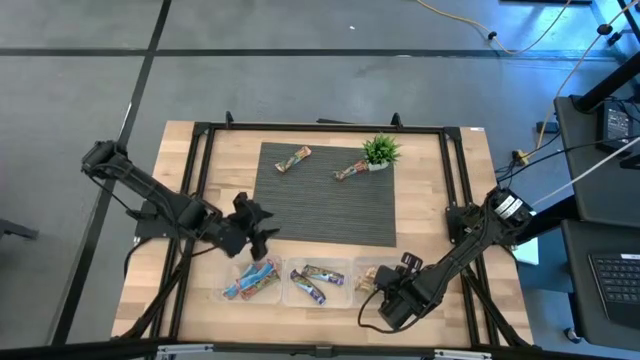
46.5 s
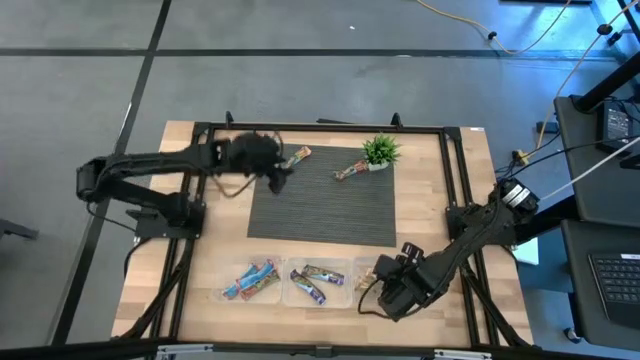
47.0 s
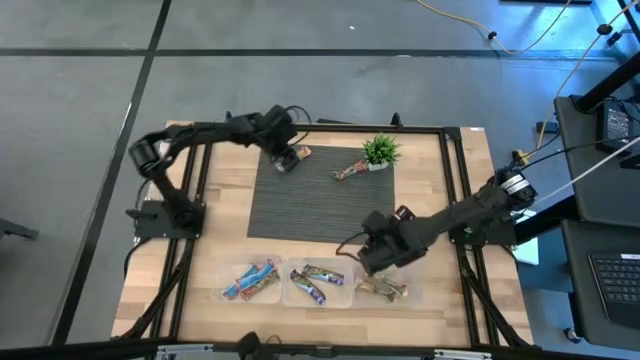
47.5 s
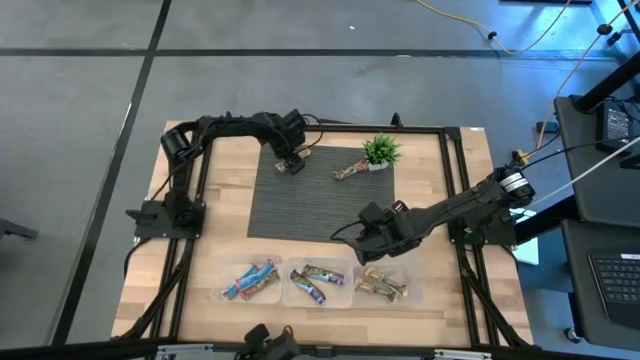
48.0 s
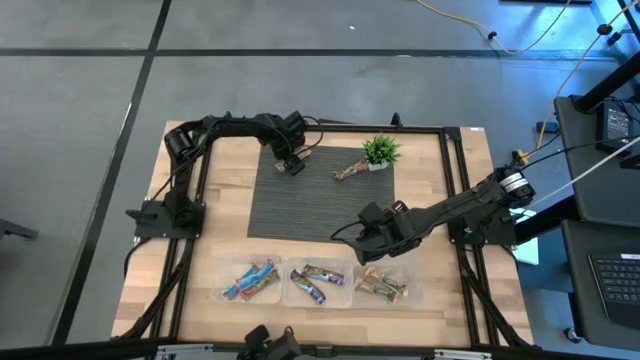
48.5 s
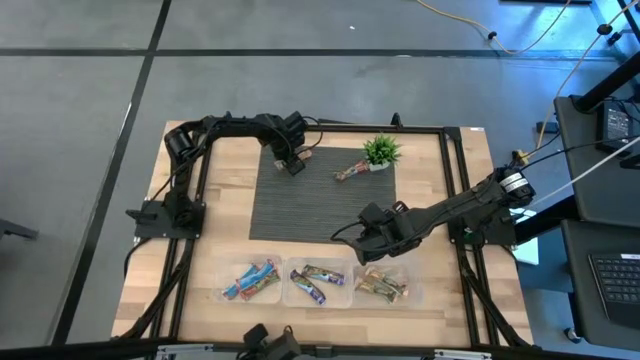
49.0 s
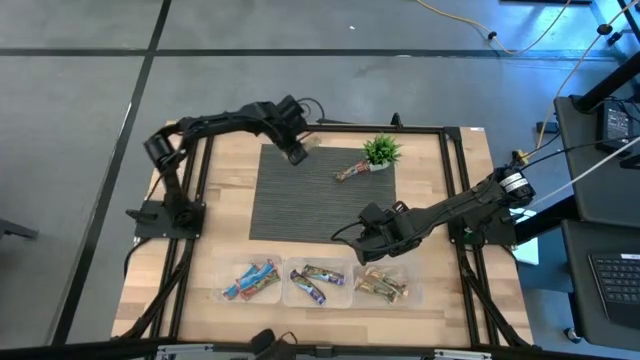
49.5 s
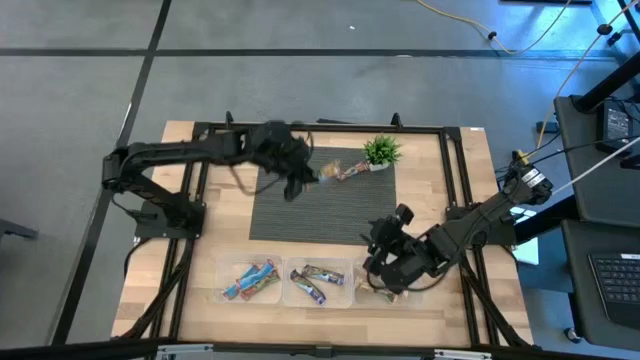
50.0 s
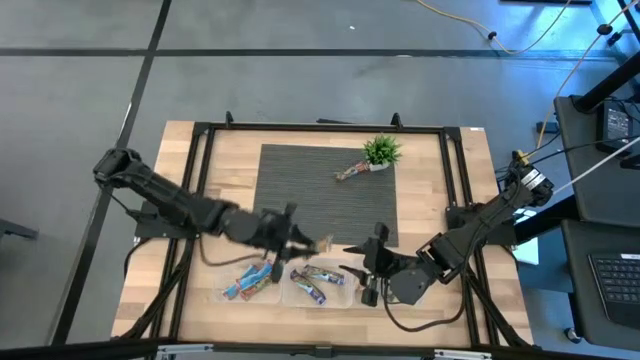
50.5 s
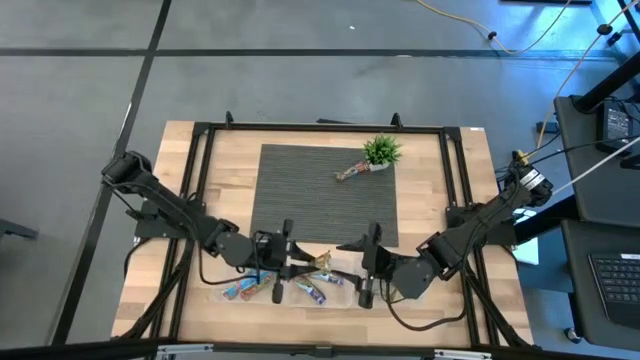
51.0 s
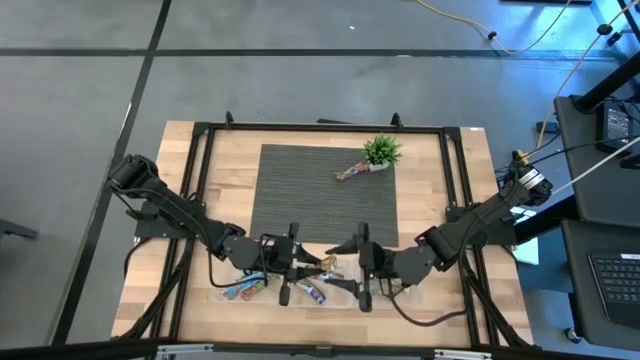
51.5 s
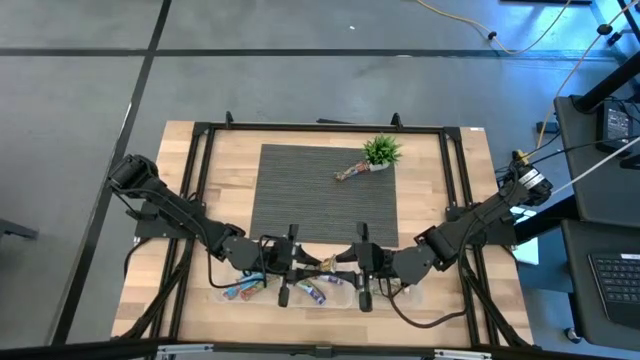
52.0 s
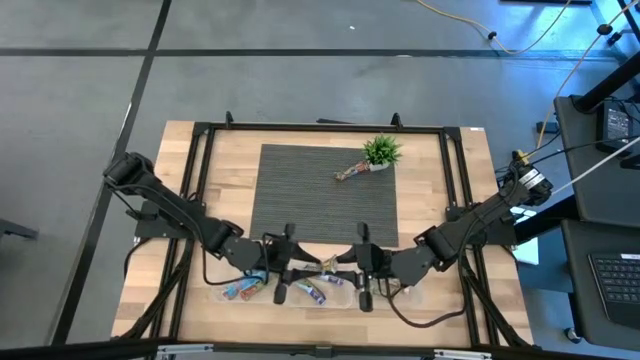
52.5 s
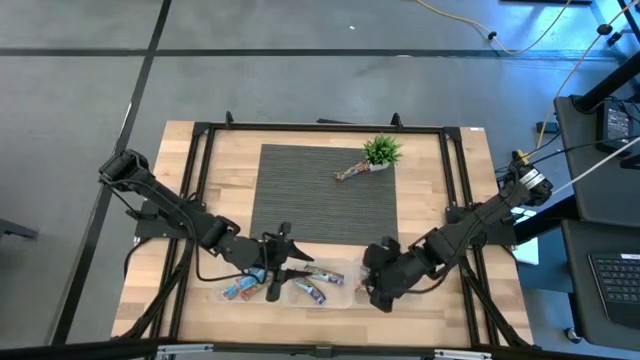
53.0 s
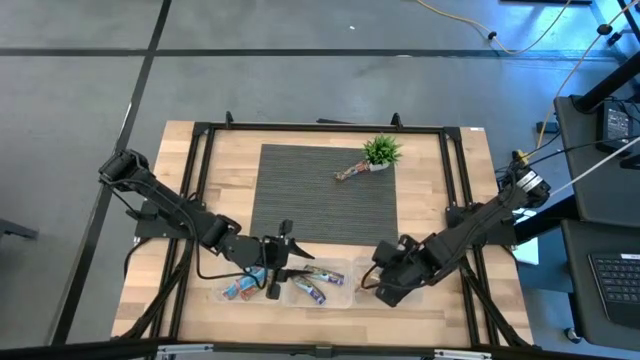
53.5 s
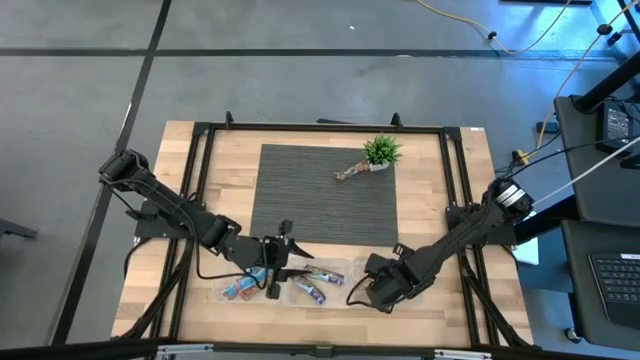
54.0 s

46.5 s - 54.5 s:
Task: Pick and place Granola Bars by type
Put the yellow granola bar into the right transparent bin

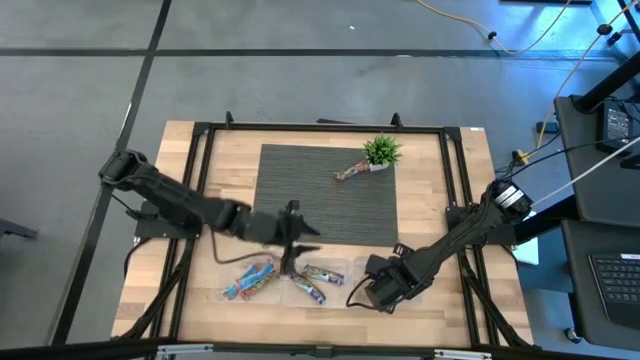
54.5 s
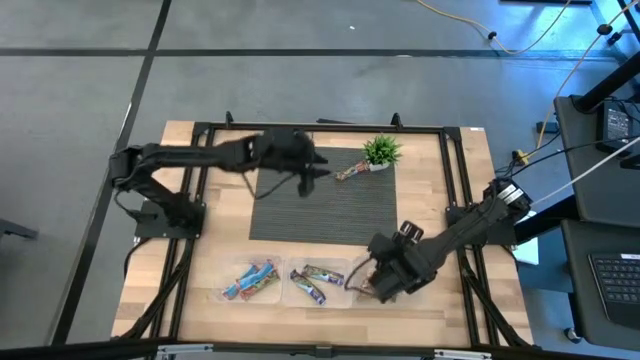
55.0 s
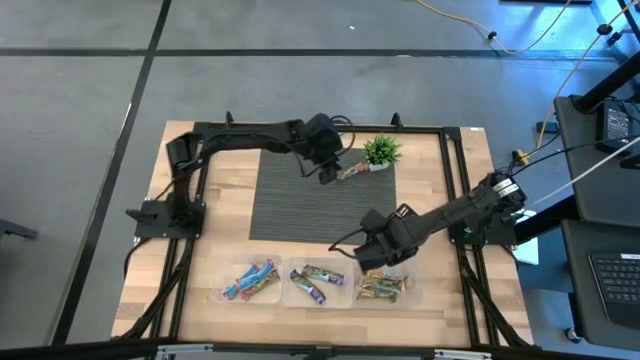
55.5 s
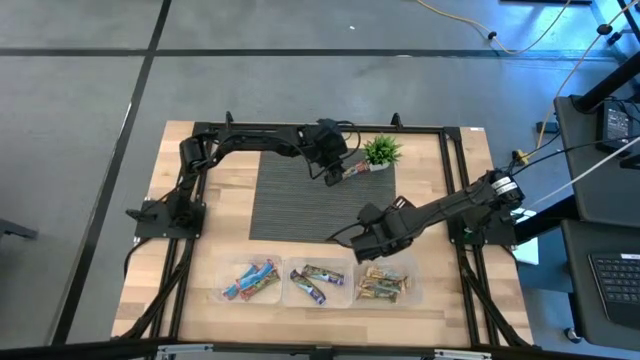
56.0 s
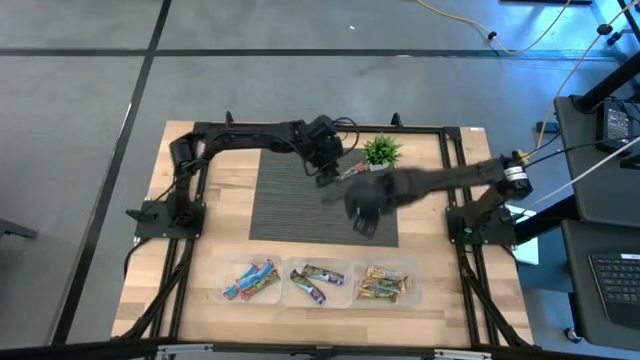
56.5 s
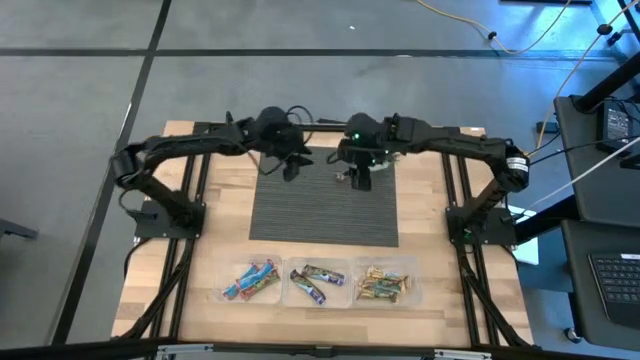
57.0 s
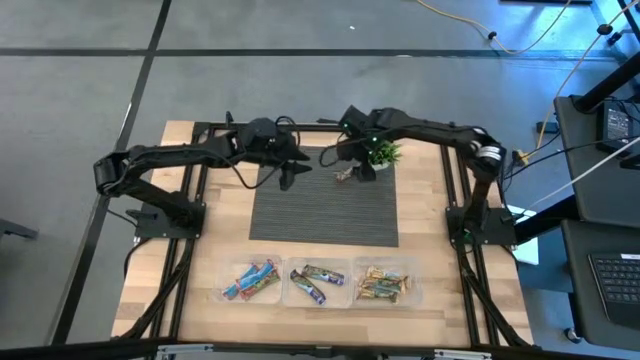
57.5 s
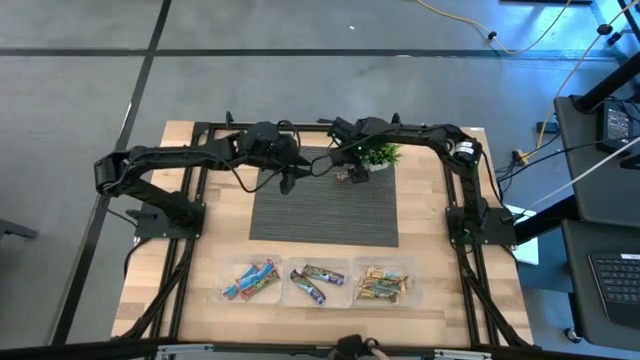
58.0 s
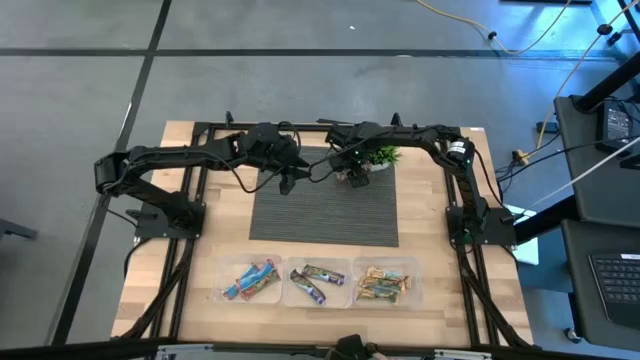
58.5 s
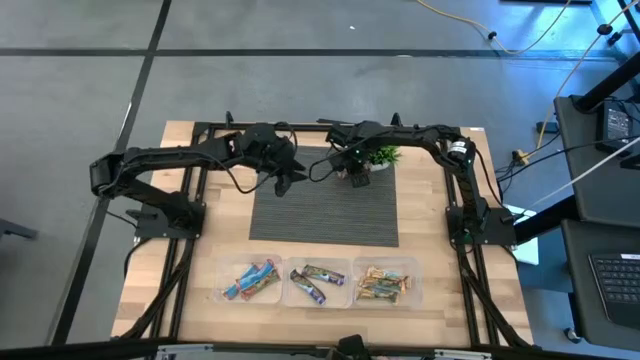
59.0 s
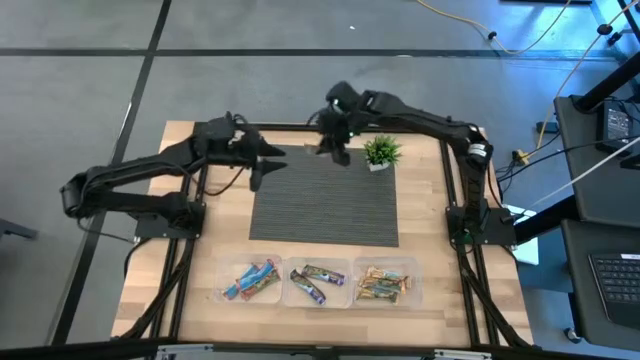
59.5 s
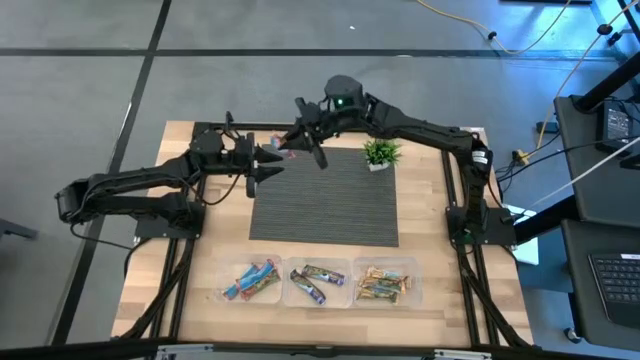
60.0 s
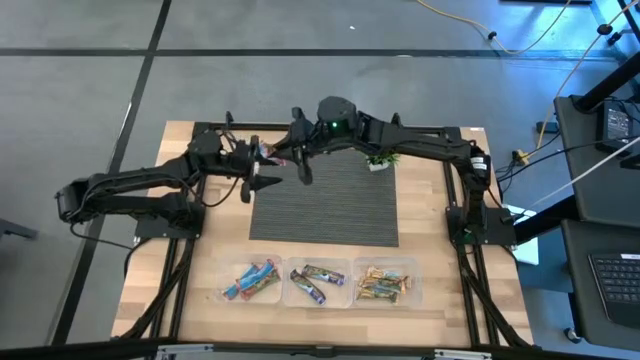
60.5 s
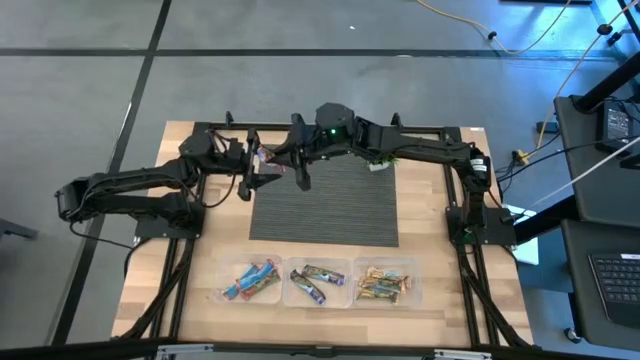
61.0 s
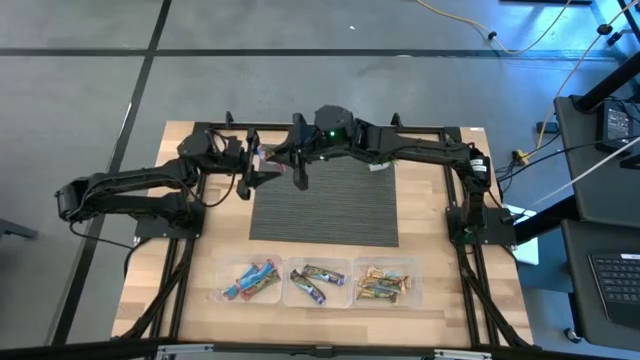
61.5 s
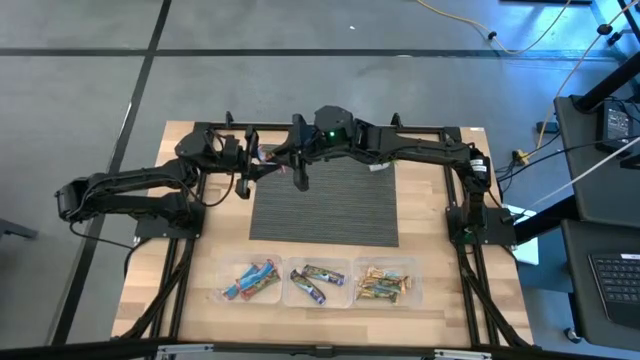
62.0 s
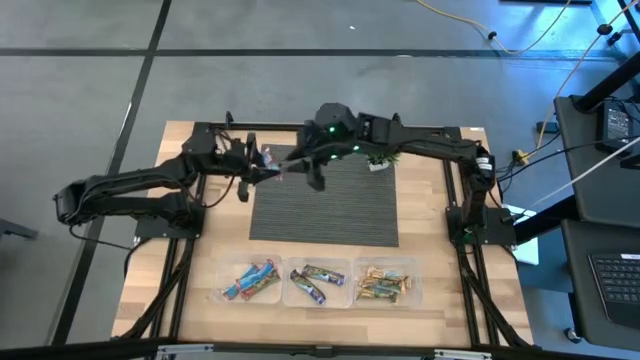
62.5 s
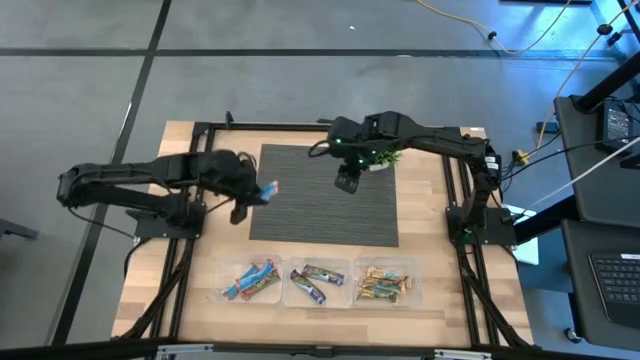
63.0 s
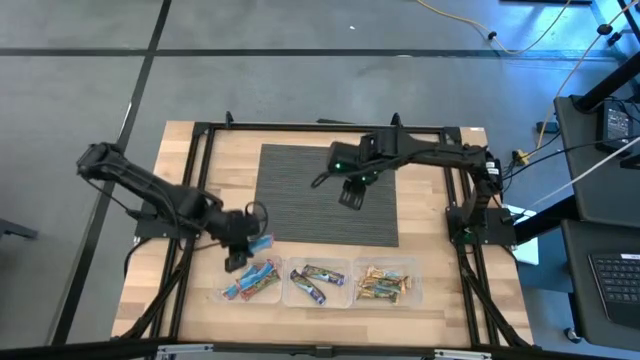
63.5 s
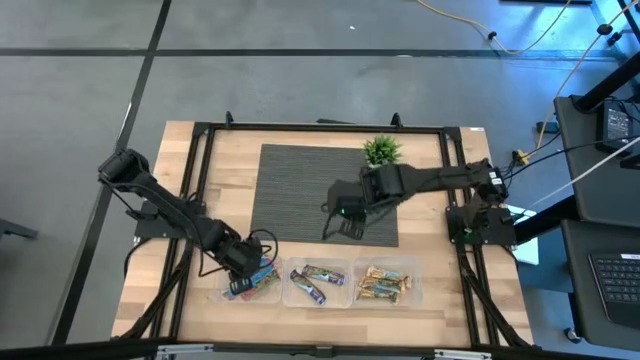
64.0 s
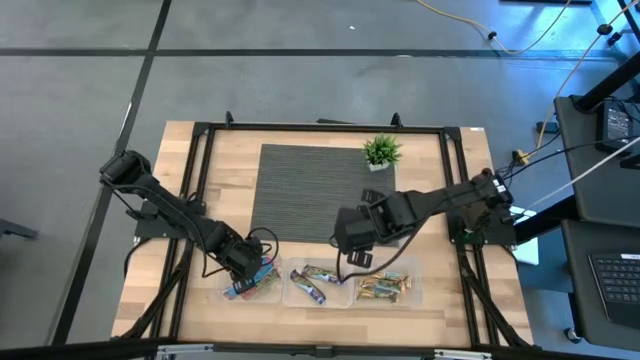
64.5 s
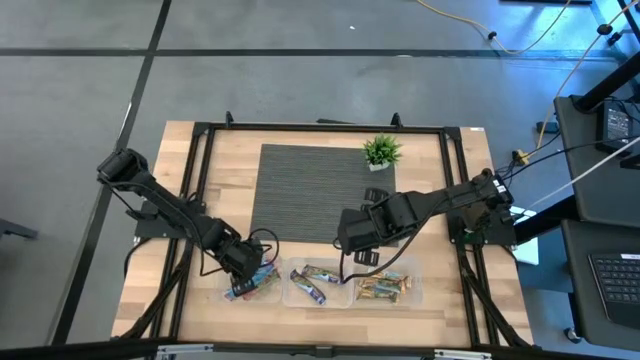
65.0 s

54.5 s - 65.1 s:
Put the red granola bar into the left transparent bin

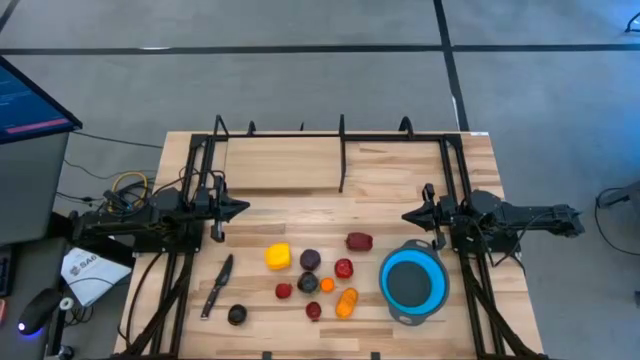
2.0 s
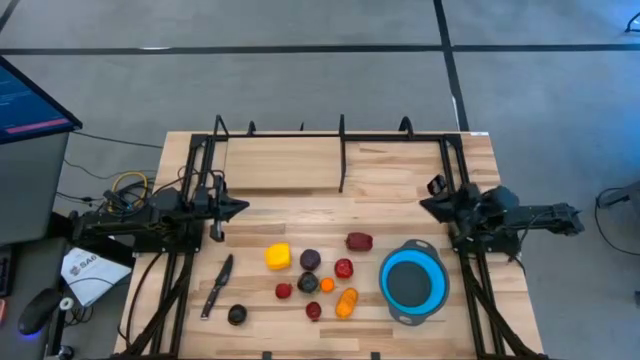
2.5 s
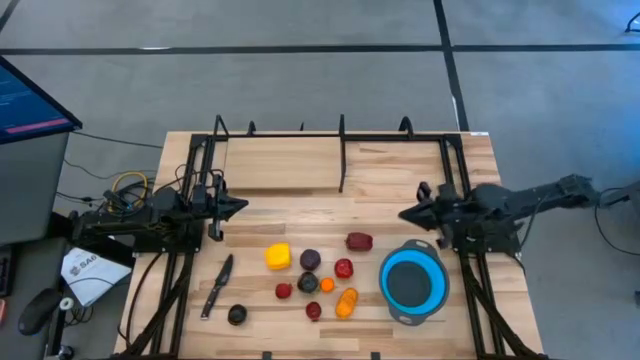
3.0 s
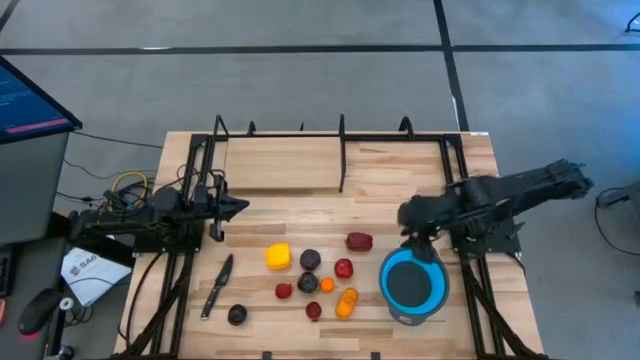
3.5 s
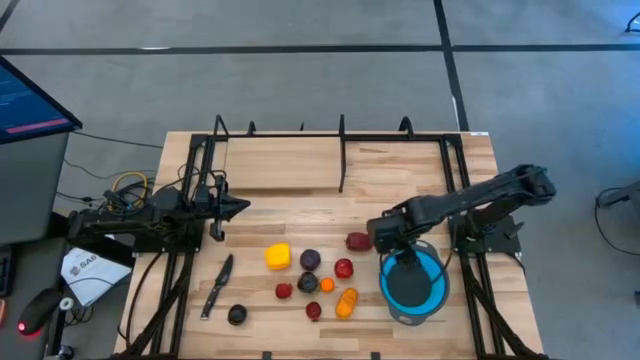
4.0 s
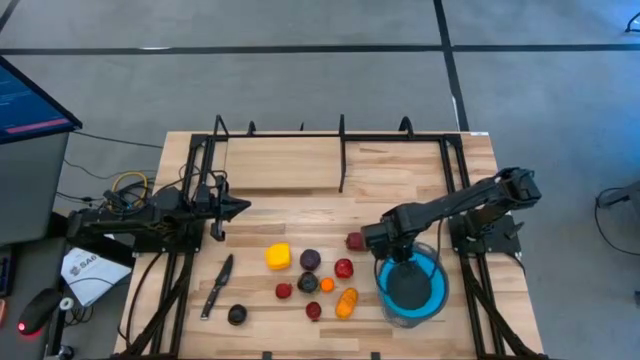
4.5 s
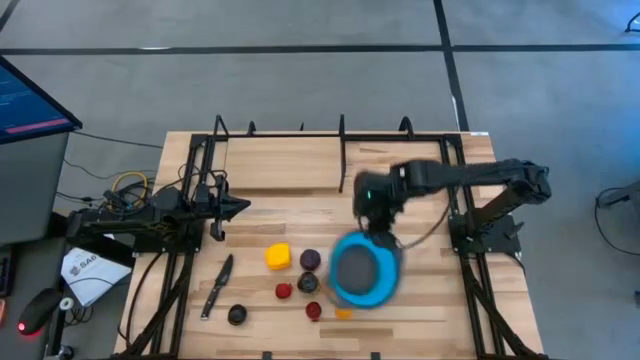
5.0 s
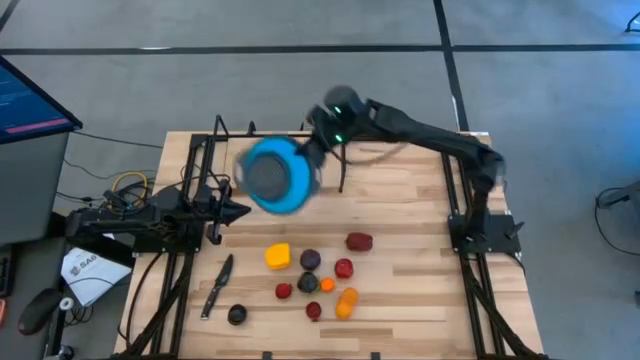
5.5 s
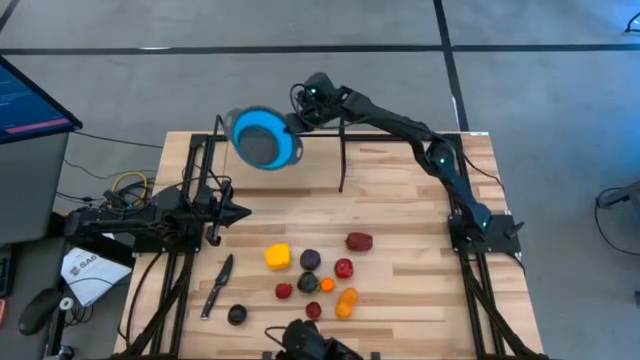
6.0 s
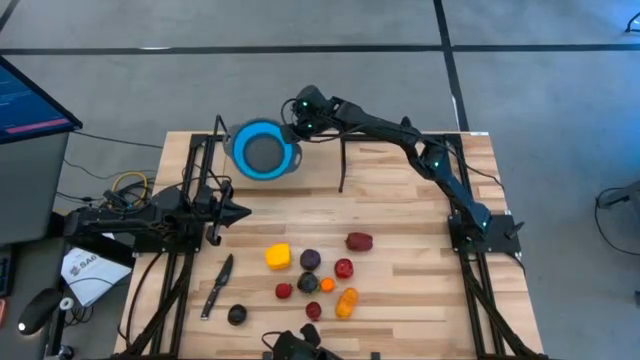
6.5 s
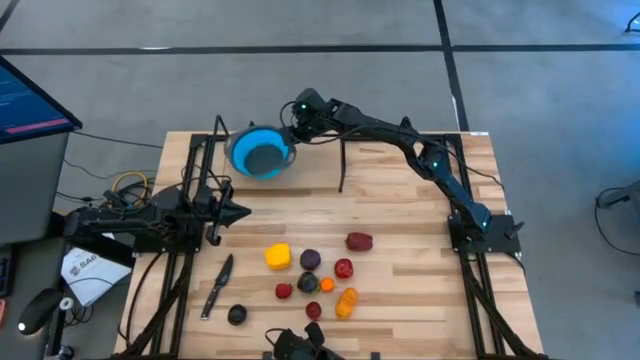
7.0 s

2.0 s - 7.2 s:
Task: Pick & Place Fruit
Put the blue strainer bowl on the shelf
